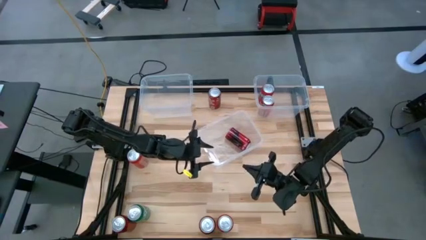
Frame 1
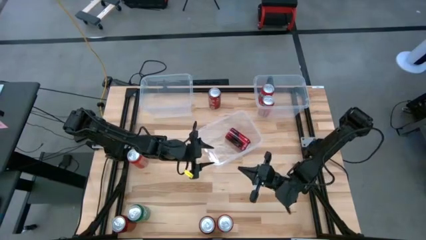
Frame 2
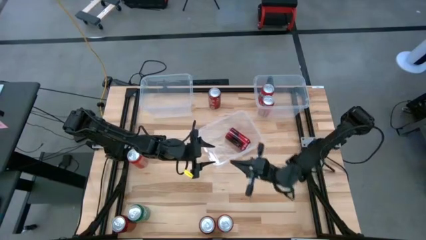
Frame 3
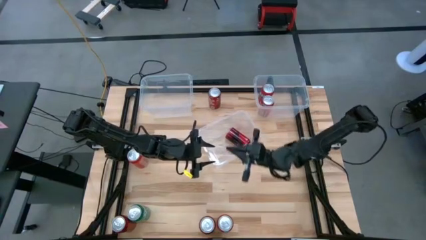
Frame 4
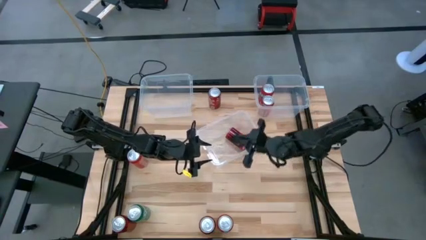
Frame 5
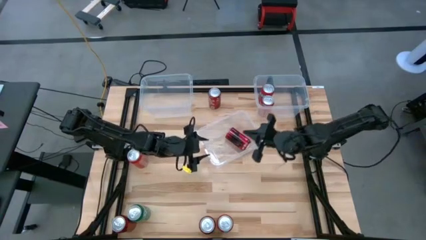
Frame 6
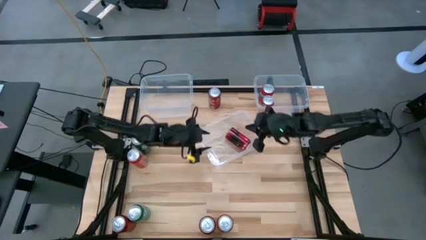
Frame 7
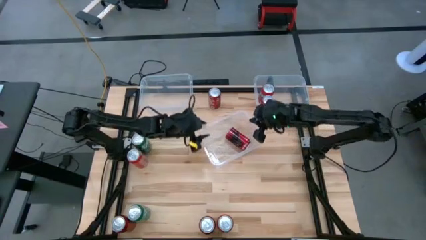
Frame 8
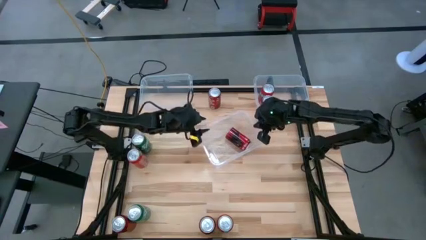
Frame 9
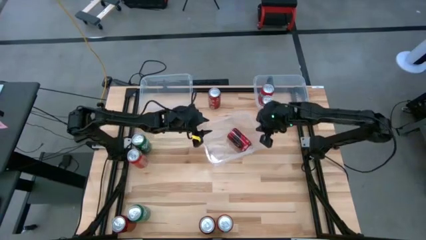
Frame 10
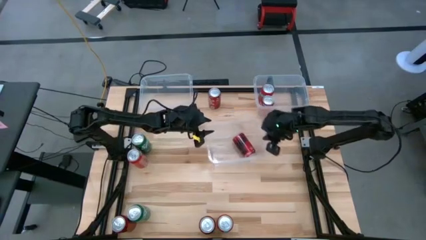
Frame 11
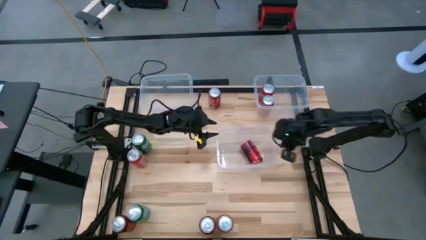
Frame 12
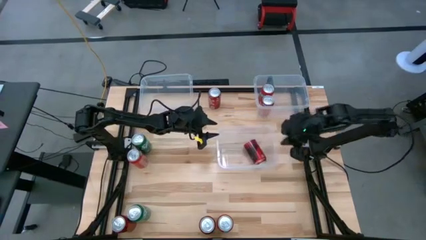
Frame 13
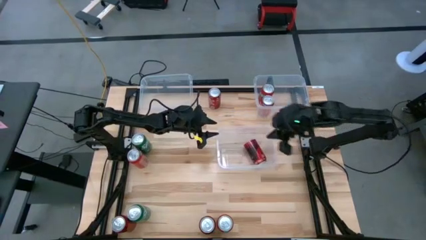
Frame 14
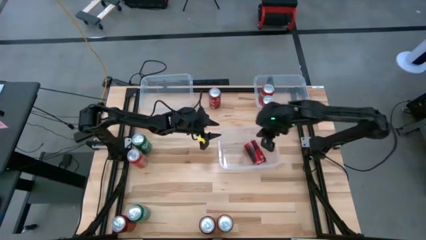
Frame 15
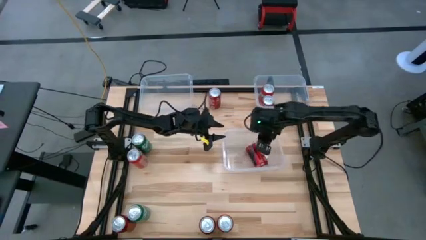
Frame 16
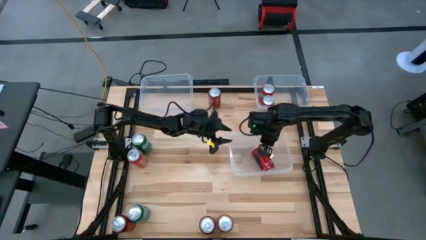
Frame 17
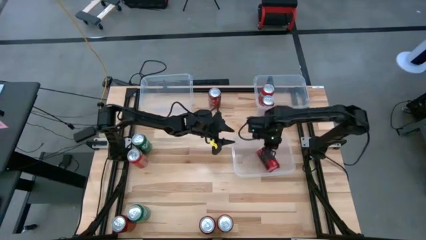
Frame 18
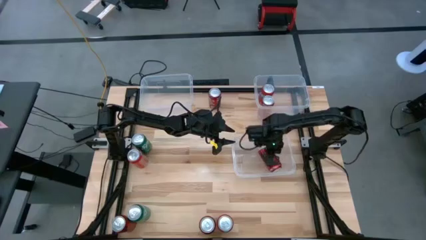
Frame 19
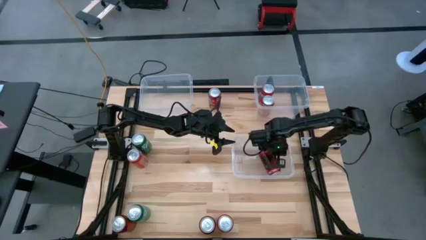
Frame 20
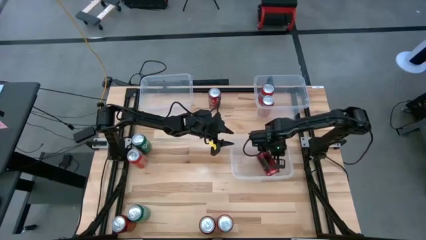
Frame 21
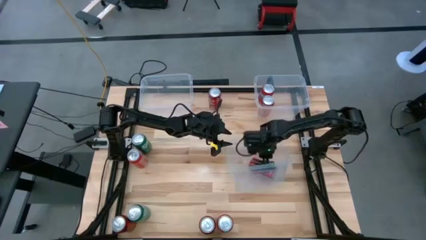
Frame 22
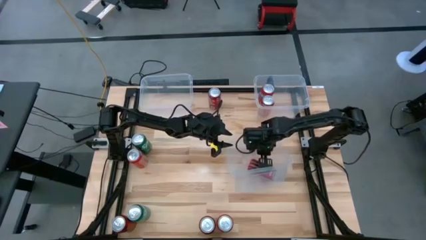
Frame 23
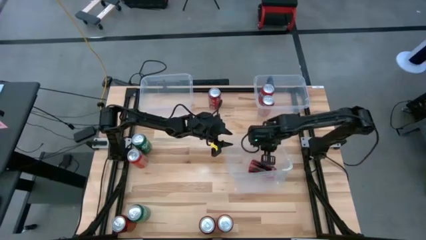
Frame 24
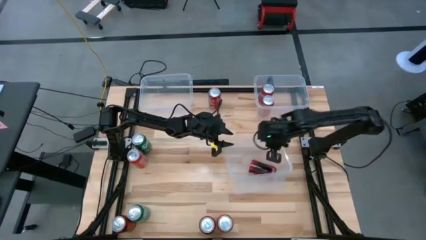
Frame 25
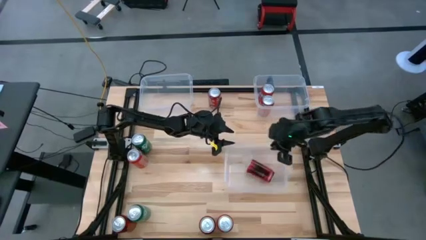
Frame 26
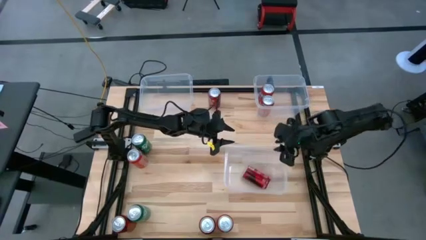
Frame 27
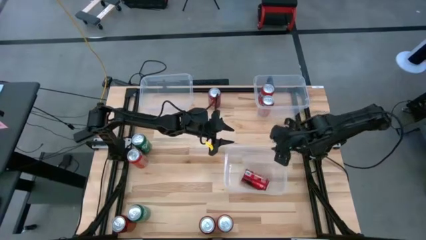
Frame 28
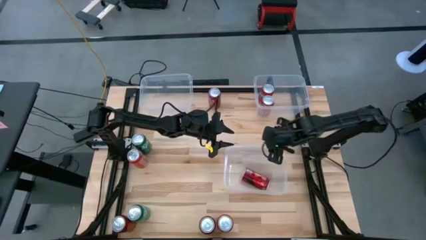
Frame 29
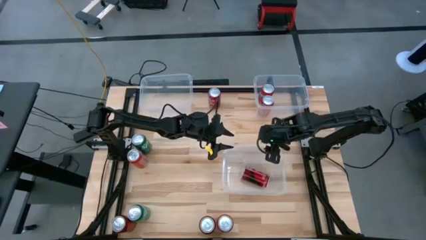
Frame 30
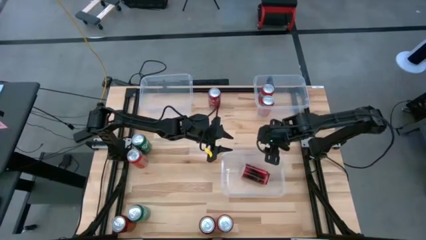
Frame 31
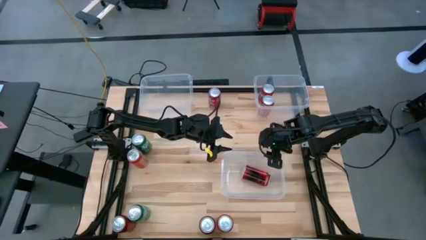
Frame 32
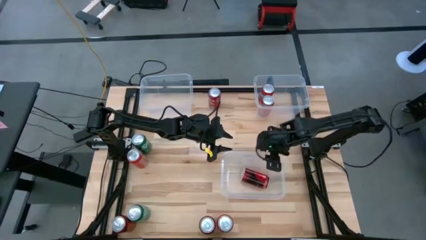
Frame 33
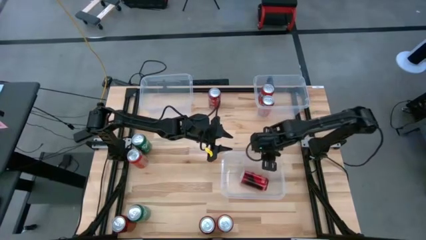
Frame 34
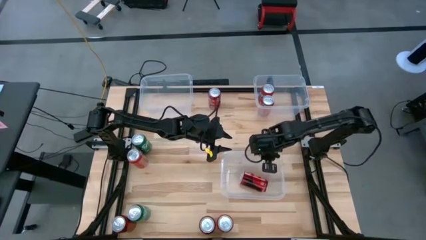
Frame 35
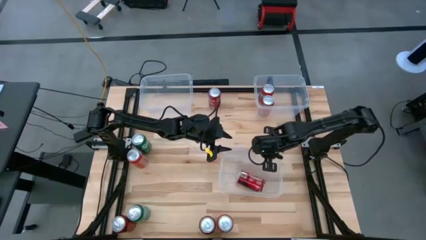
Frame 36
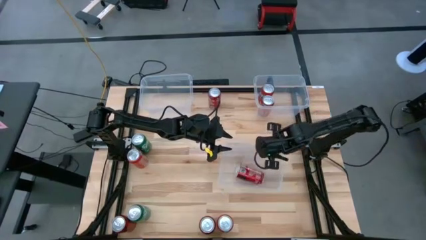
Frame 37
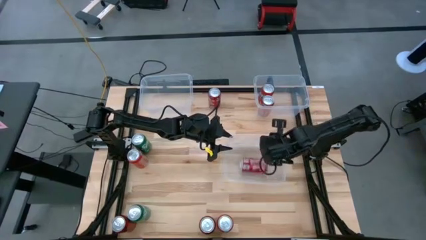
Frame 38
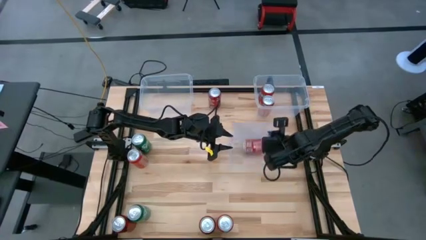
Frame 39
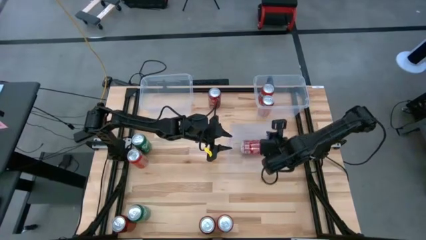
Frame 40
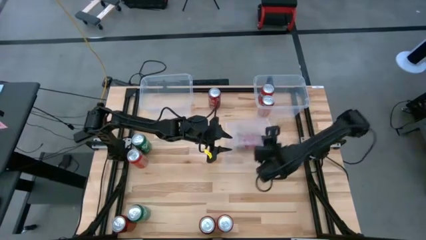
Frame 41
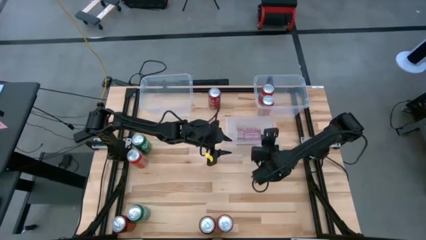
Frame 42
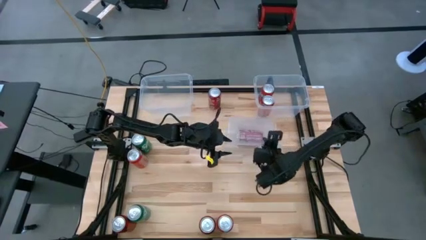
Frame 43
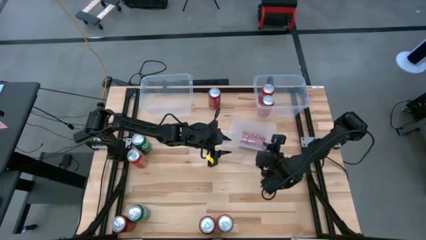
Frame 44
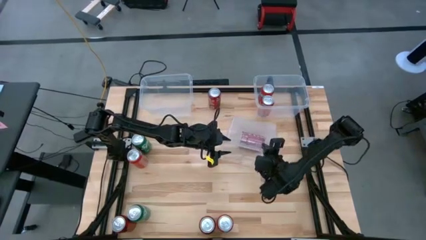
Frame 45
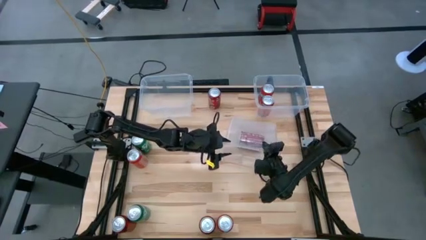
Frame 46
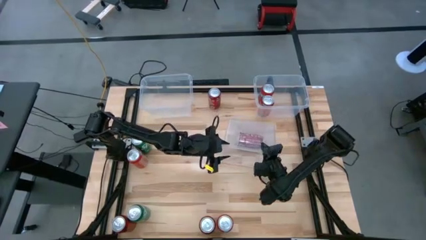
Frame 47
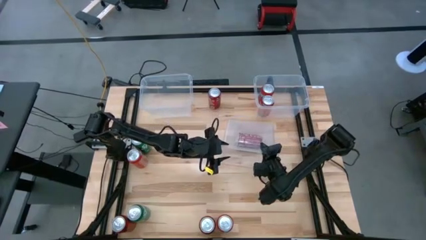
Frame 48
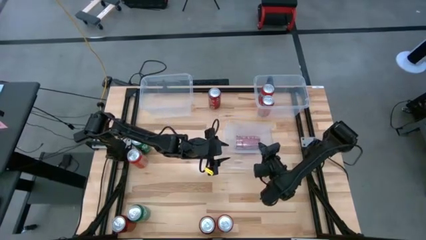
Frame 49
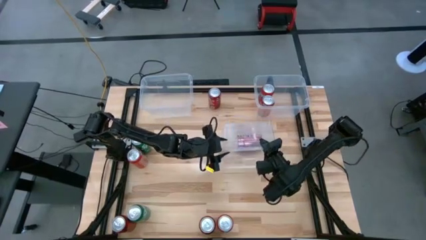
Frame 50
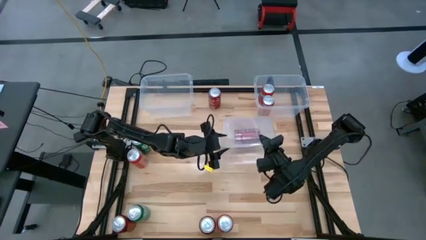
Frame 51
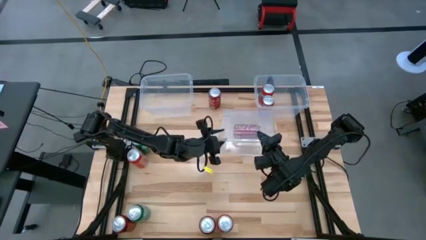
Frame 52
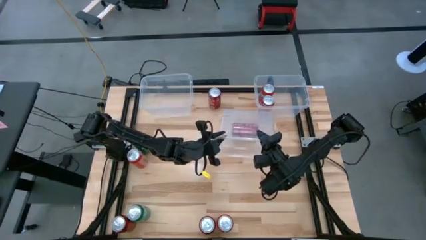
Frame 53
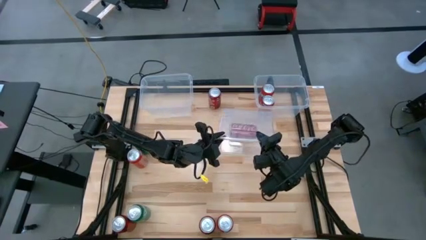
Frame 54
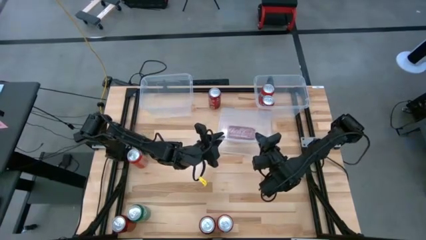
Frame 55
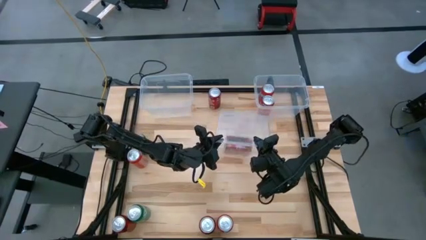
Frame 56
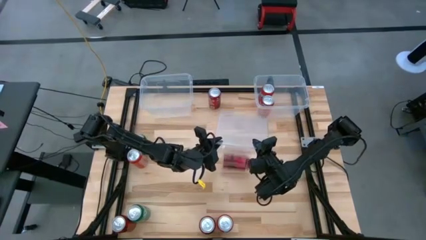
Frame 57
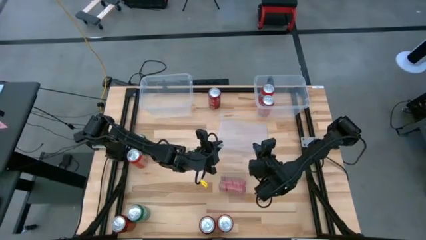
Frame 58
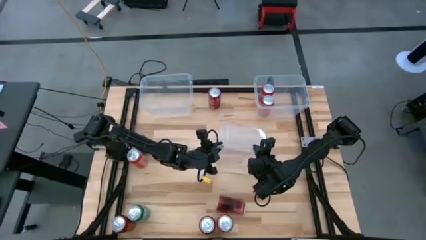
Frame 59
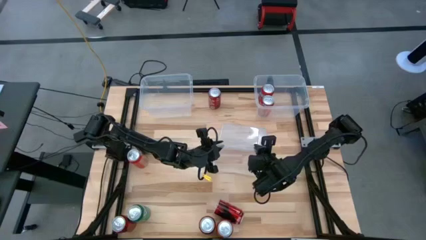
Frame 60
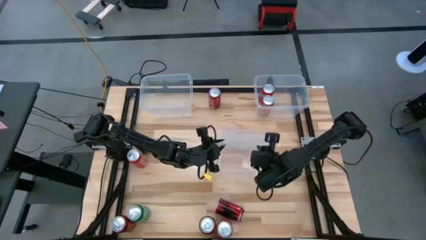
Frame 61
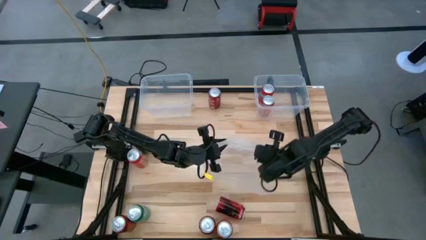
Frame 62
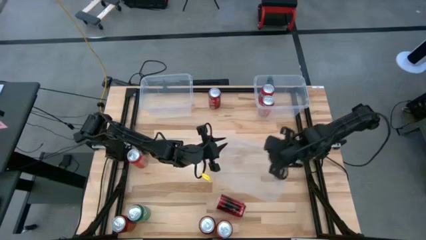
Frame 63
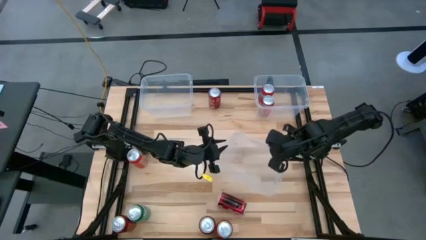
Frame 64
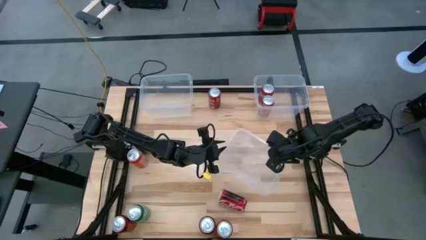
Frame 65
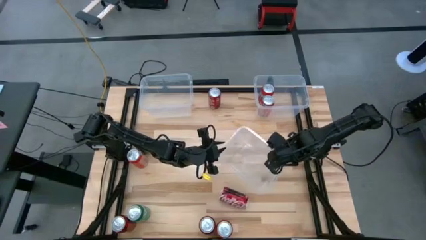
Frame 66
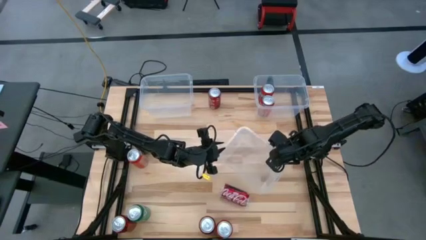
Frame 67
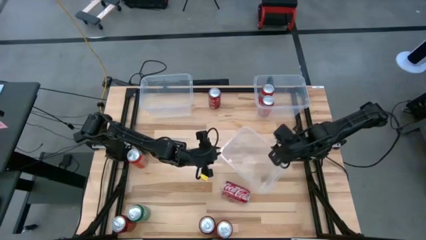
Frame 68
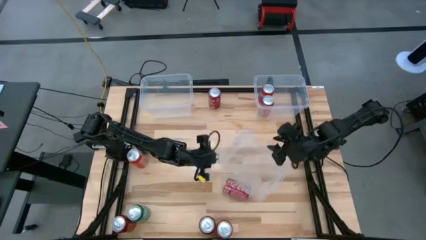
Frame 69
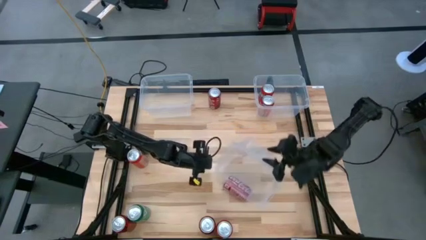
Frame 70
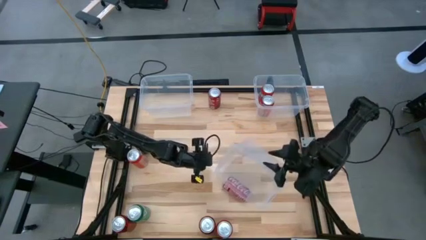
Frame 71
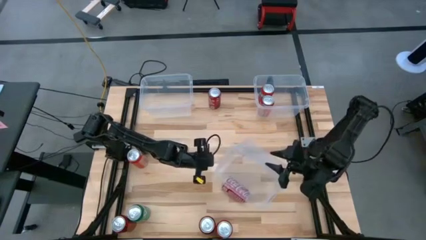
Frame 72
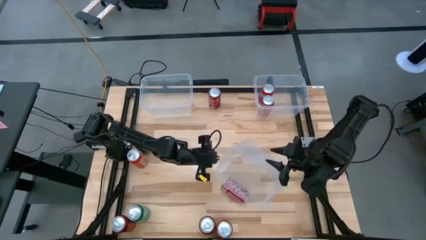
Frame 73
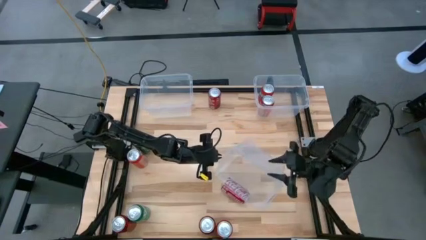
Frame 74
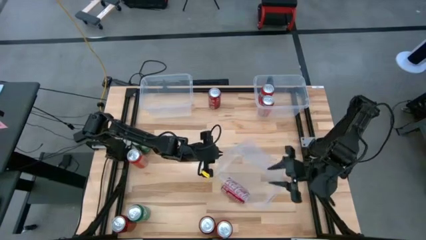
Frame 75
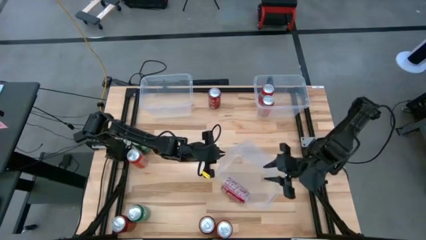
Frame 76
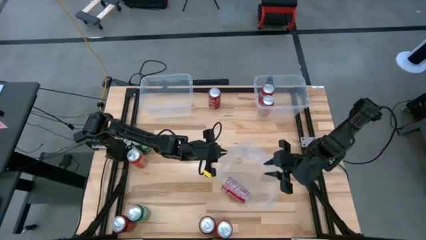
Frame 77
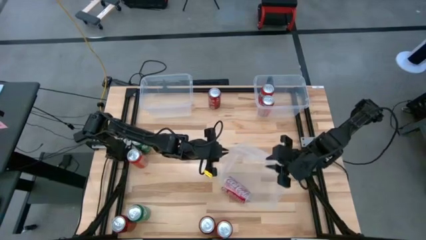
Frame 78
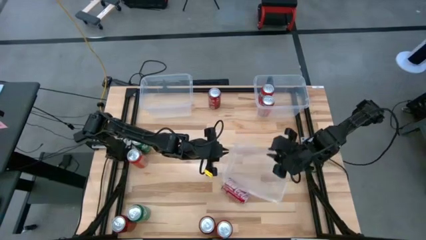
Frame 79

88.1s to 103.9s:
Task: Sort soda cans
Put the middle right red-white soda can into the bottom transparent bin

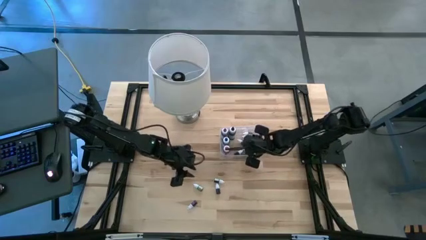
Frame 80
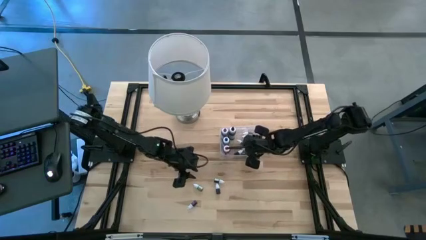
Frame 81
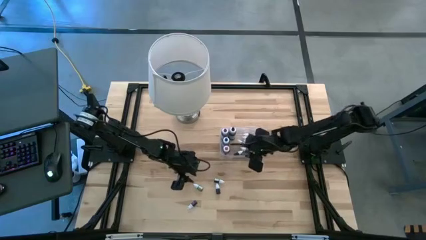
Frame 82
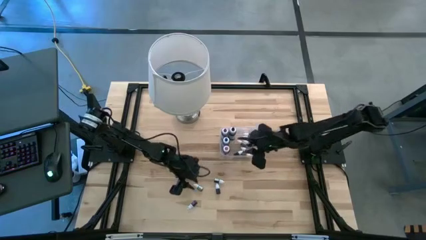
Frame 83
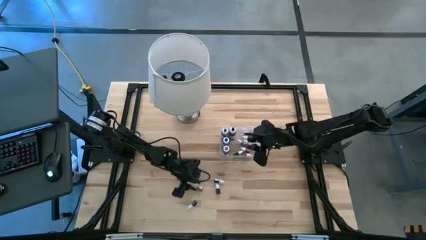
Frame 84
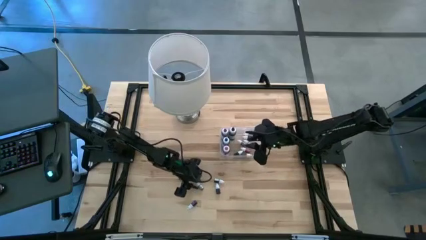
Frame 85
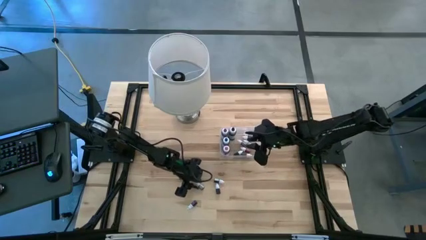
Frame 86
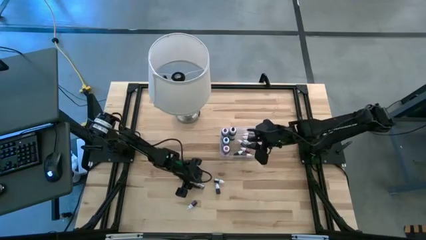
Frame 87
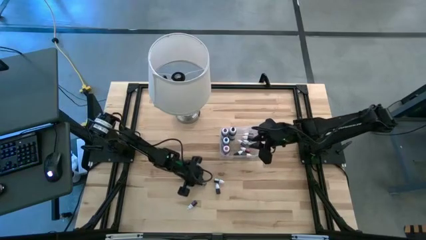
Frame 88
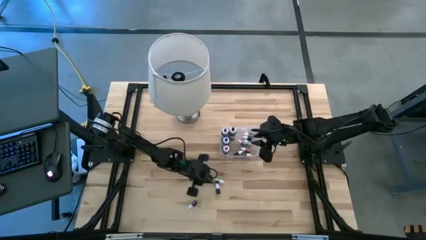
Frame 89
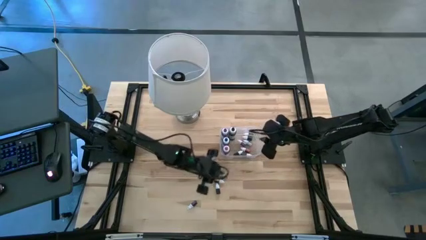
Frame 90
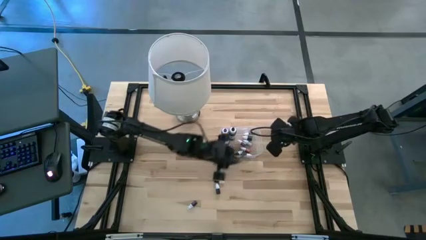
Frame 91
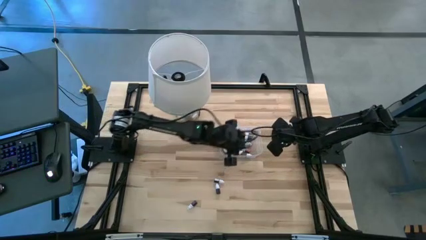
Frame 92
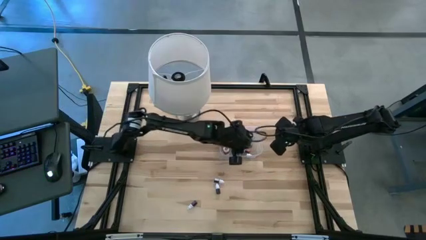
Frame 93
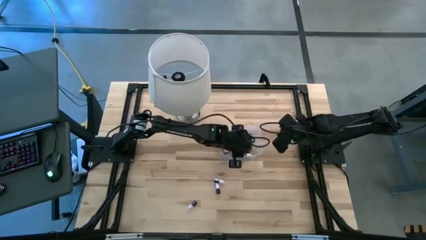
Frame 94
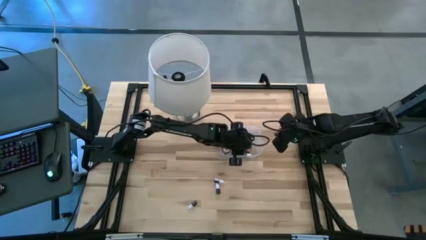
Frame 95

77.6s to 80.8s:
Task: Pick & Place food coloring
Put the small green food coloring bottle into the transparent bin
